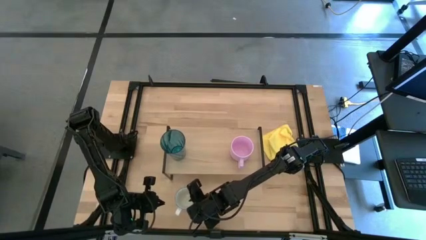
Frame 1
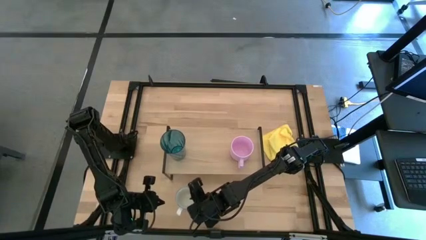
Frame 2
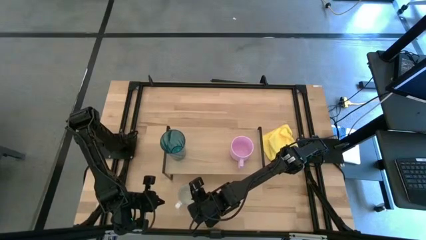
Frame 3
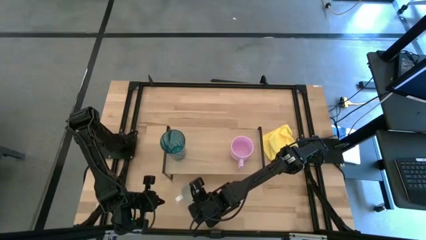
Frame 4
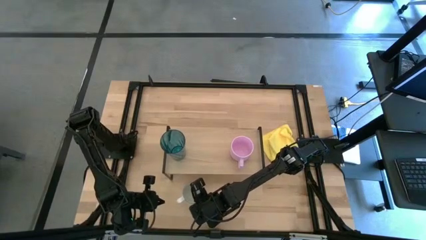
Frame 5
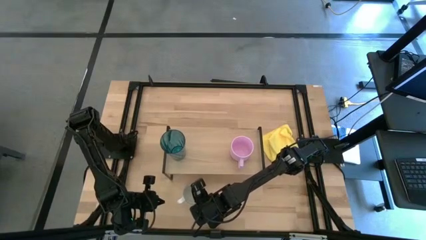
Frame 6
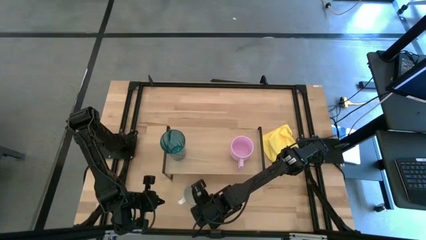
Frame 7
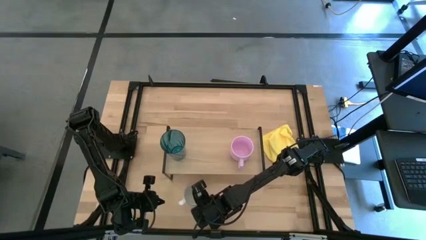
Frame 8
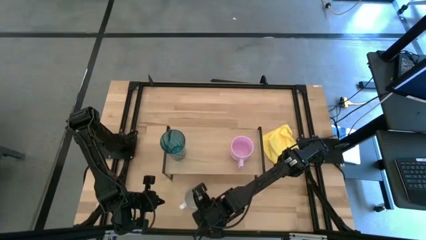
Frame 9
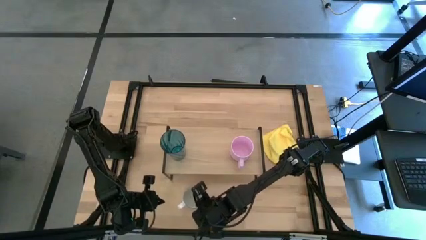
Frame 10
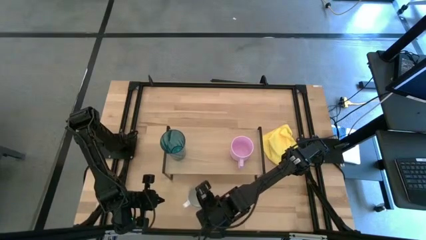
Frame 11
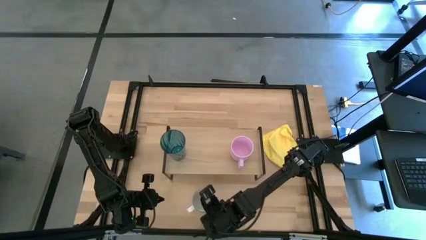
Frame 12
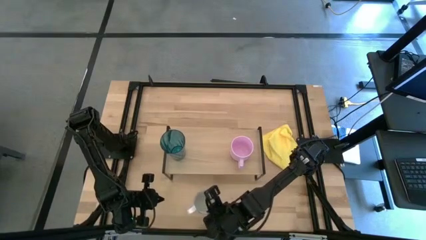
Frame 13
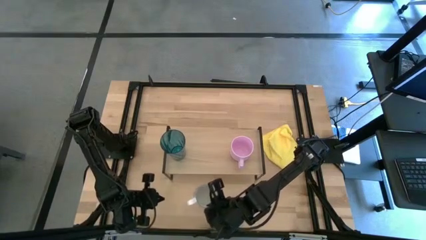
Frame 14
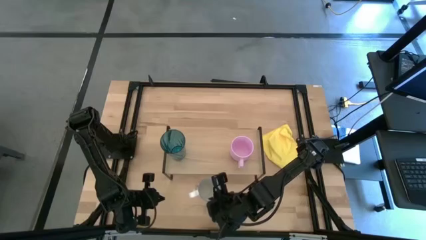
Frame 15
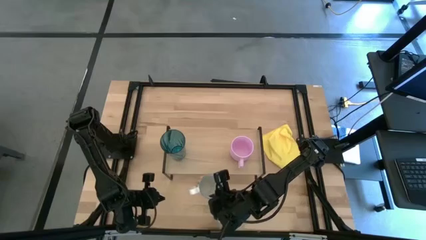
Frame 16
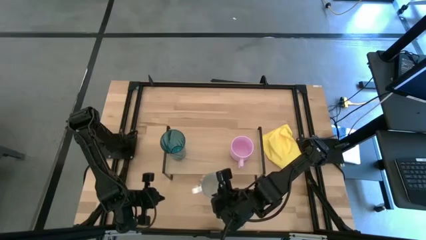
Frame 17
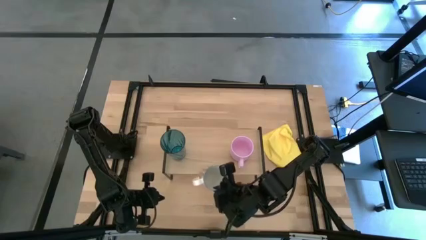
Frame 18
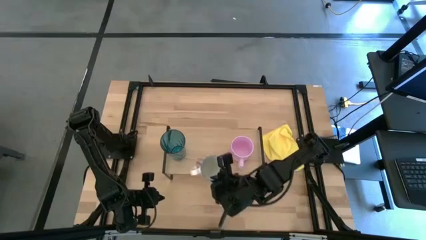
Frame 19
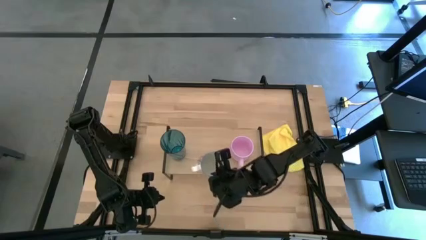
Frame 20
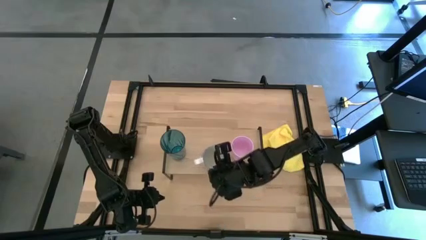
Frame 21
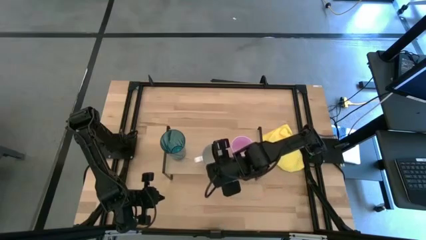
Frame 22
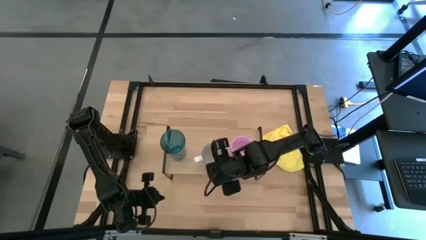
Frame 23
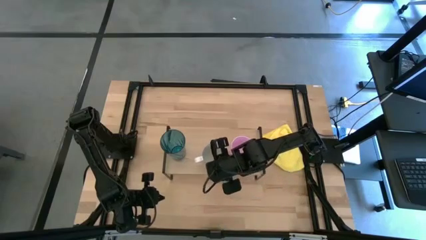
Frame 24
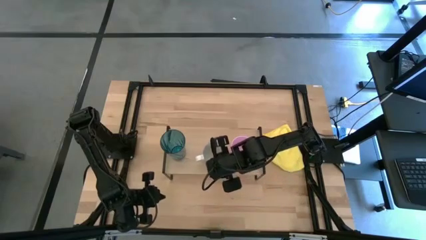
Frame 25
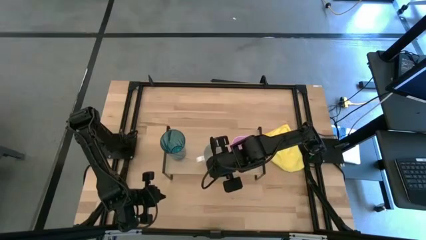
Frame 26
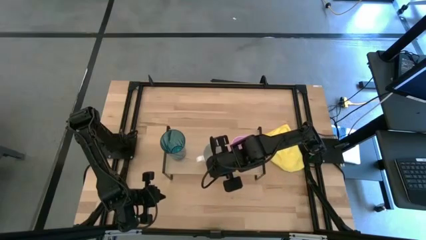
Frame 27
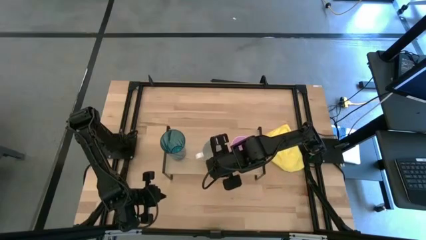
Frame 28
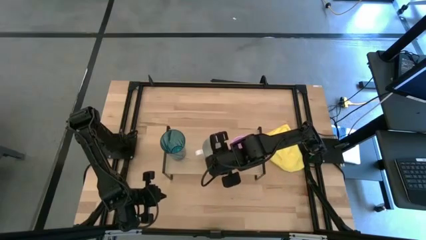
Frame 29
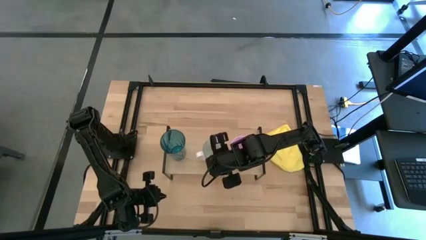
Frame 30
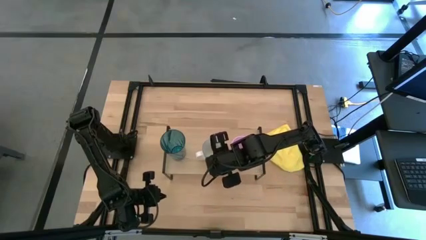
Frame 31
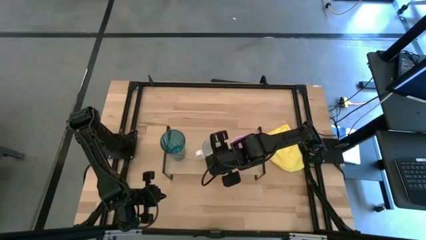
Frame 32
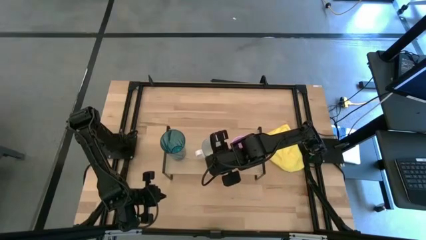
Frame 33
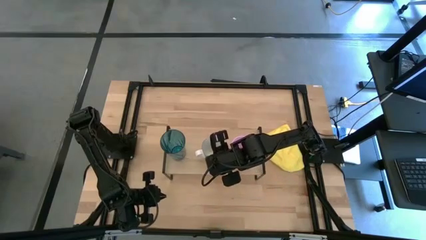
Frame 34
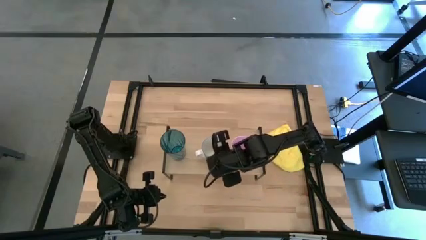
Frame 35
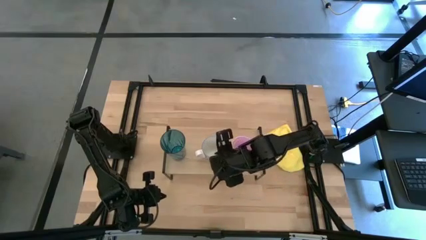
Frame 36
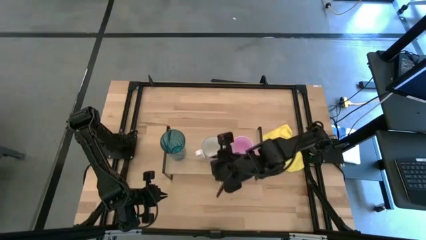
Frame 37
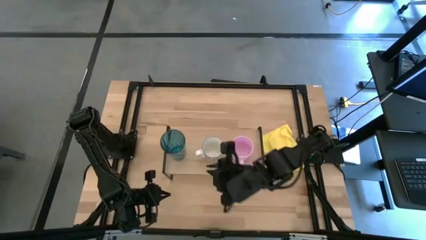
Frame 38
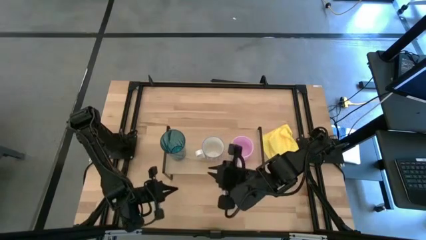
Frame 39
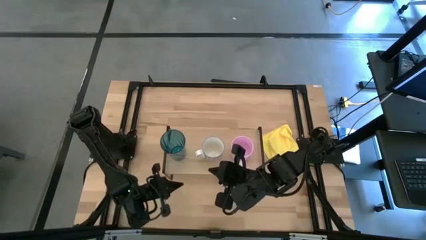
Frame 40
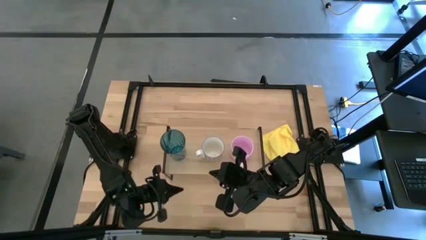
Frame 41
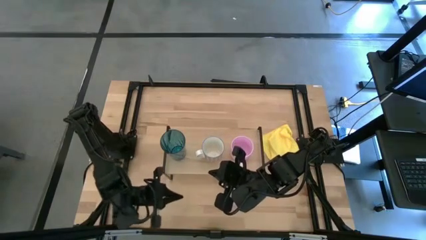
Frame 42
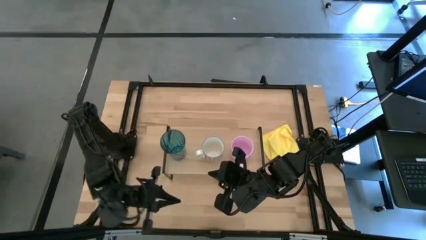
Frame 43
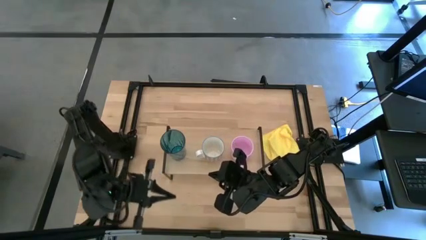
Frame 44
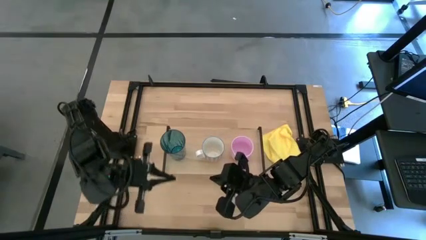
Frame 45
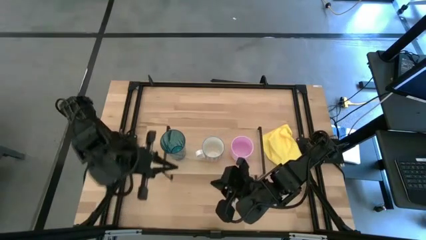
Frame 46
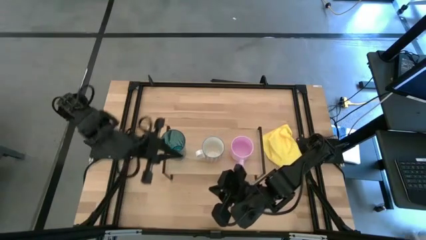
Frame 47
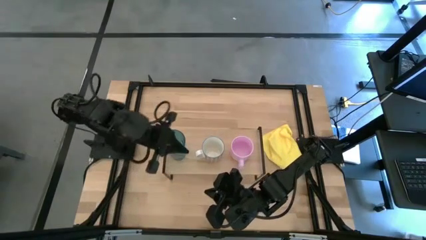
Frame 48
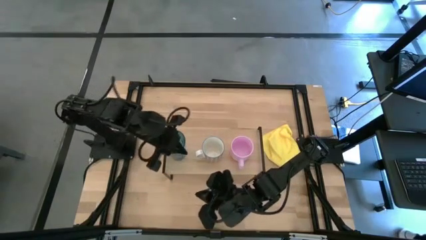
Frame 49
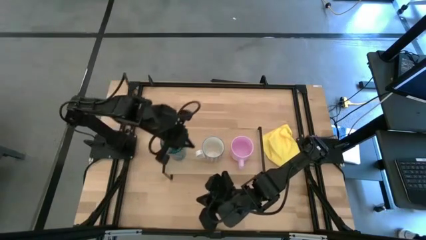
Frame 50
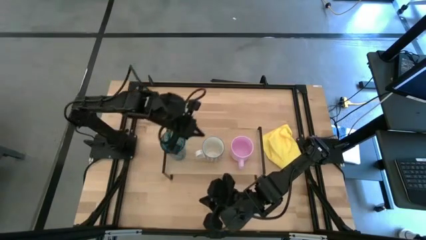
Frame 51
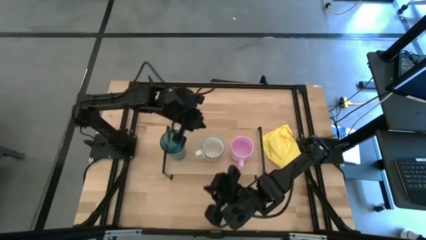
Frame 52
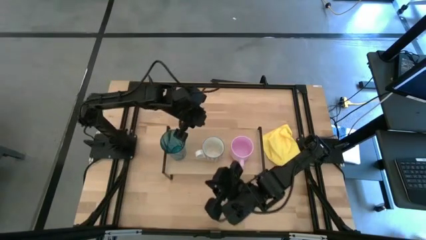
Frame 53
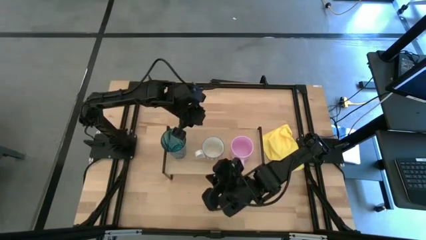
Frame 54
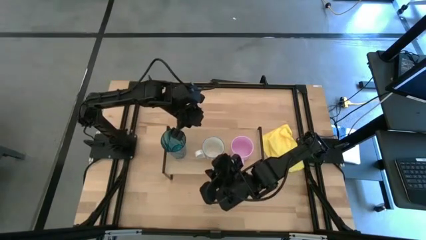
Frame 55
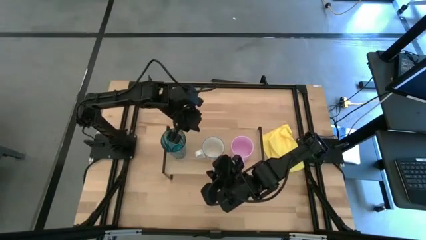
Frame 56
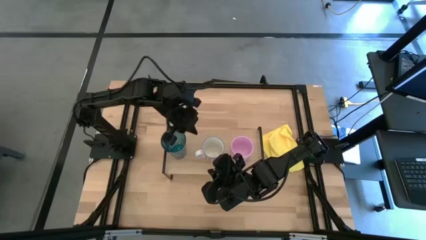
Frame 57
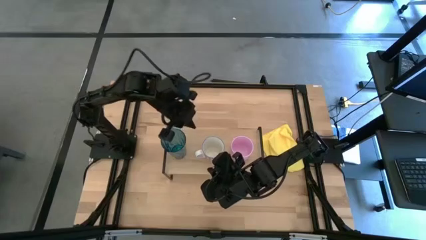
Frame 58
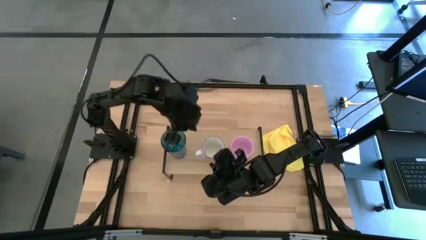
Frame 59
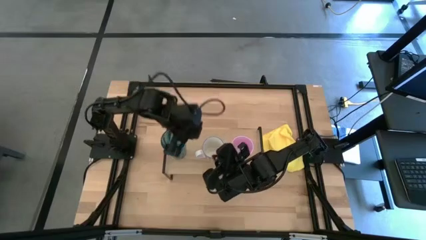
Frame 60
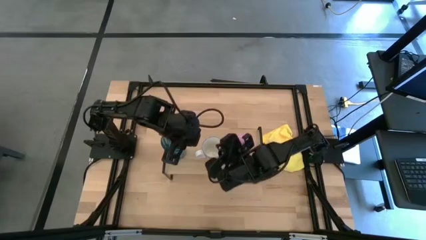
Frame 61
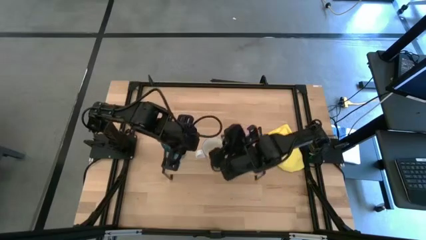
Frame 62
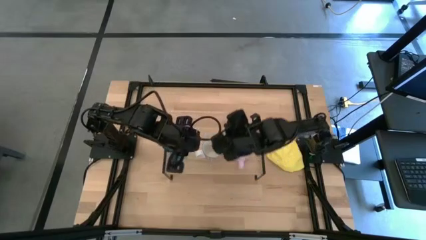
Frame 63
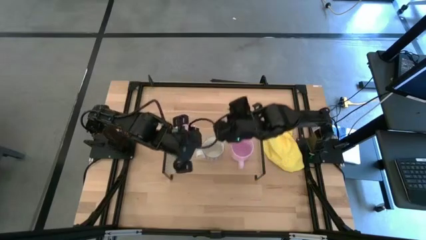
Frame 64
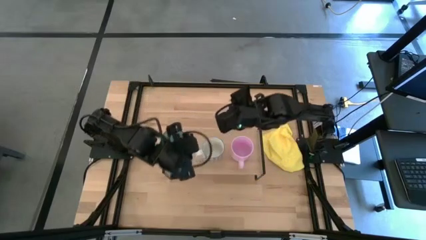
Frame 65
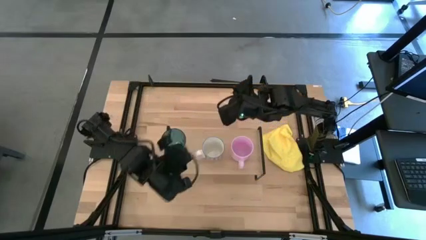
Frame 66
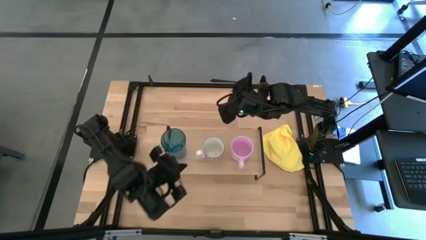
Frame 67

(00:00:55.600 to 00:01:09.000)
Task: Stack small to large cups/mugs on shelf
Put the red cup on the shelf
